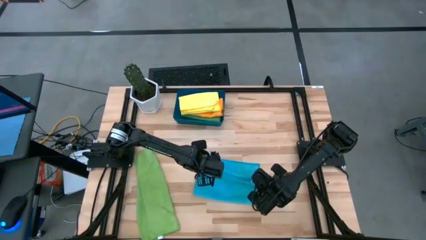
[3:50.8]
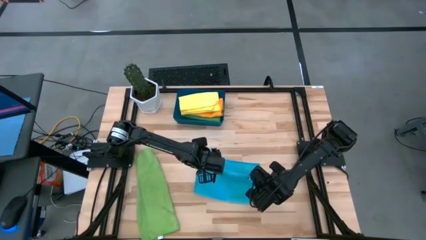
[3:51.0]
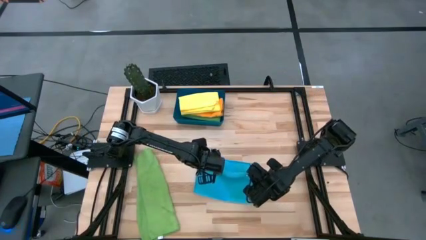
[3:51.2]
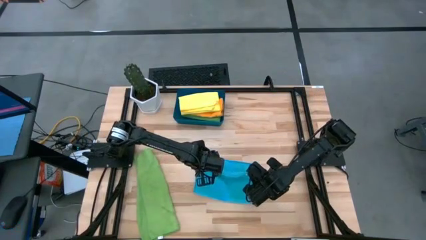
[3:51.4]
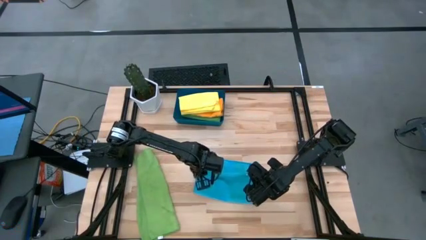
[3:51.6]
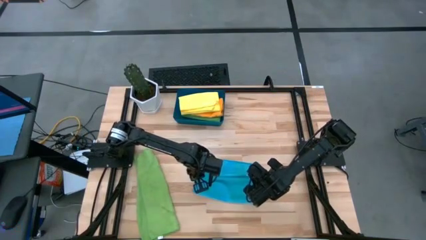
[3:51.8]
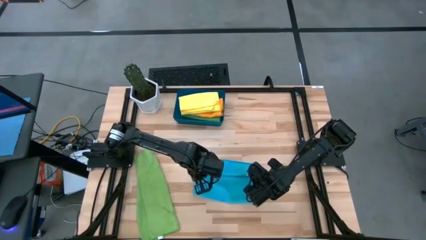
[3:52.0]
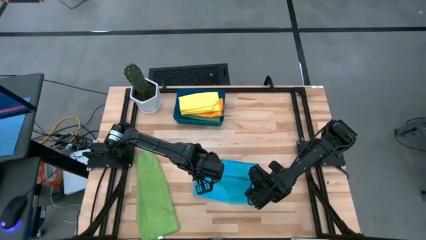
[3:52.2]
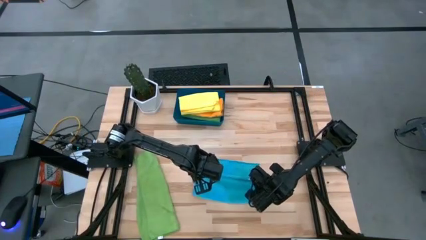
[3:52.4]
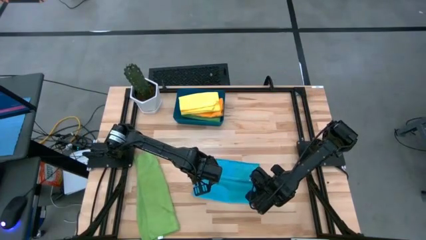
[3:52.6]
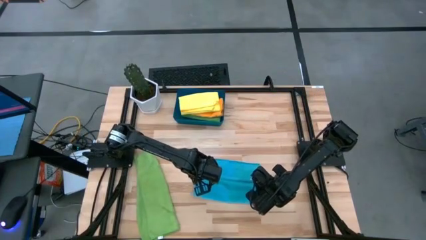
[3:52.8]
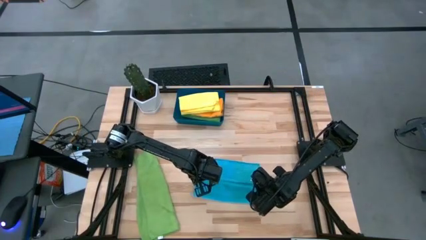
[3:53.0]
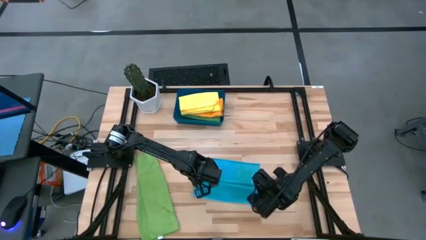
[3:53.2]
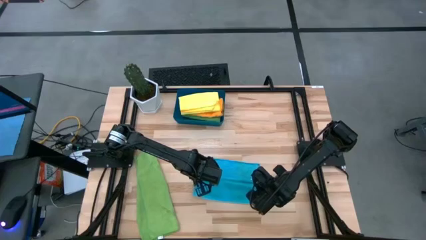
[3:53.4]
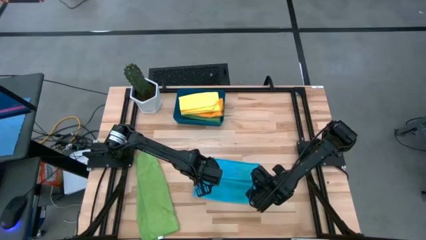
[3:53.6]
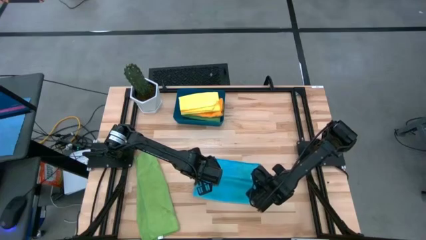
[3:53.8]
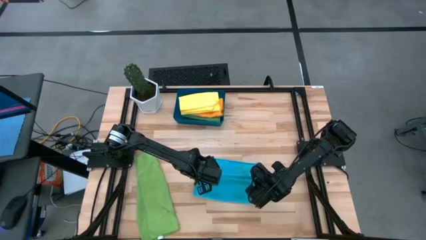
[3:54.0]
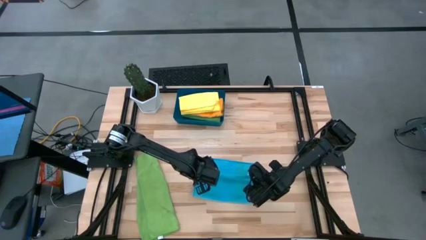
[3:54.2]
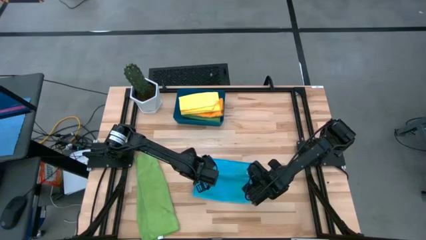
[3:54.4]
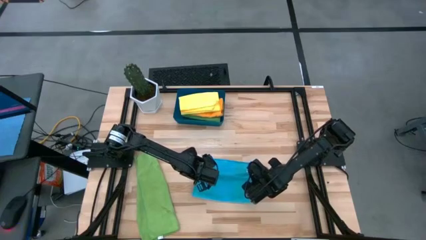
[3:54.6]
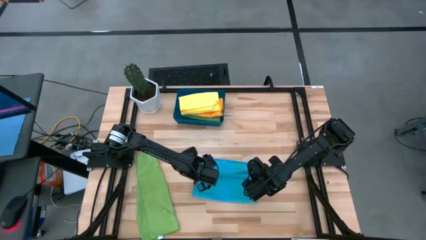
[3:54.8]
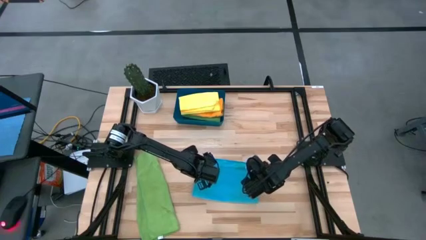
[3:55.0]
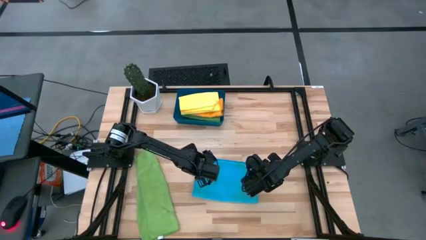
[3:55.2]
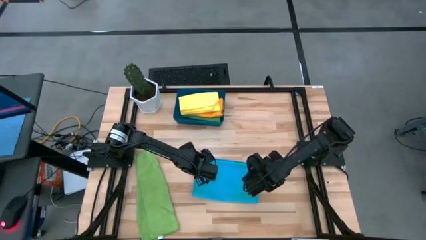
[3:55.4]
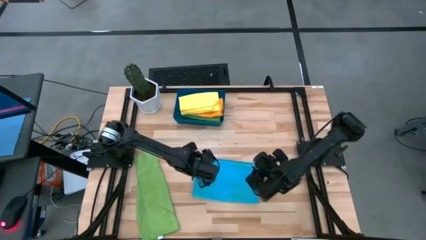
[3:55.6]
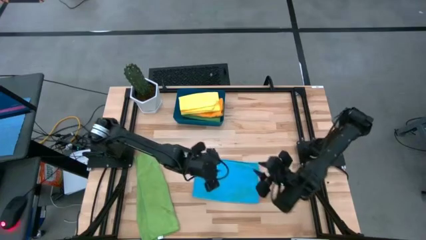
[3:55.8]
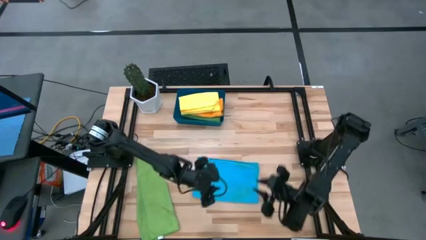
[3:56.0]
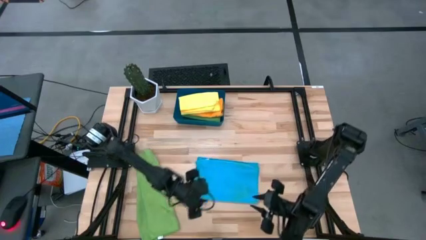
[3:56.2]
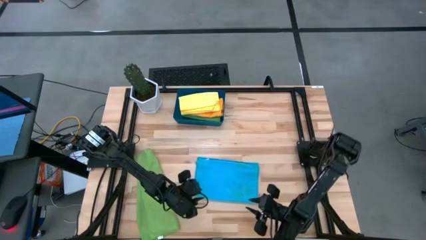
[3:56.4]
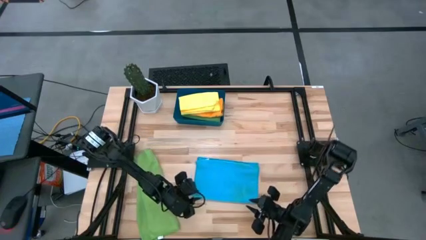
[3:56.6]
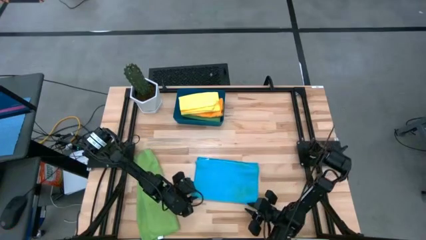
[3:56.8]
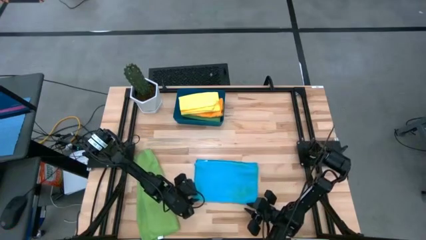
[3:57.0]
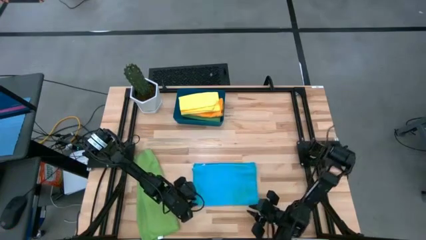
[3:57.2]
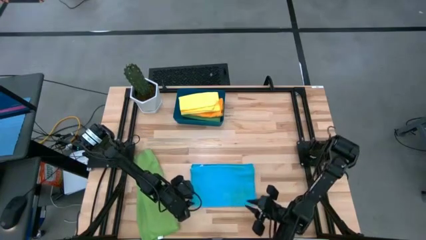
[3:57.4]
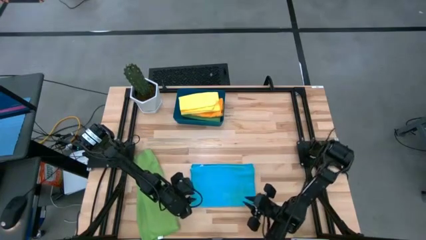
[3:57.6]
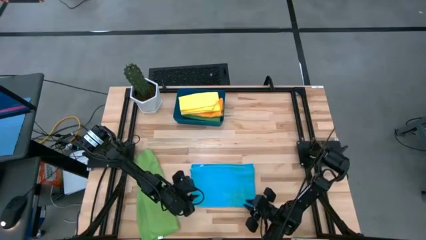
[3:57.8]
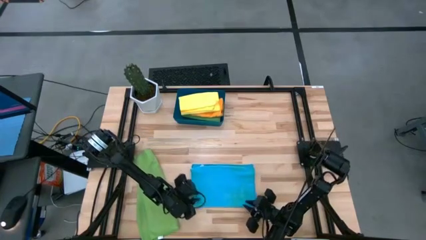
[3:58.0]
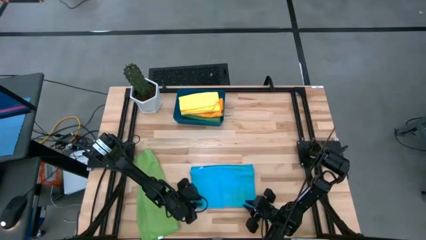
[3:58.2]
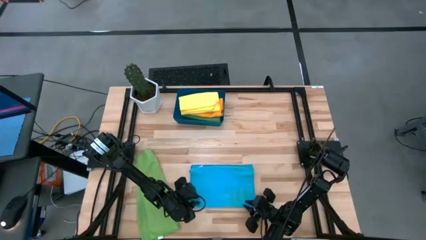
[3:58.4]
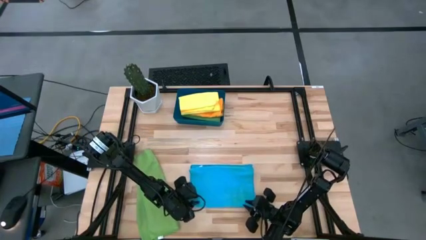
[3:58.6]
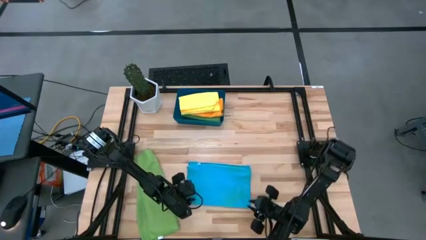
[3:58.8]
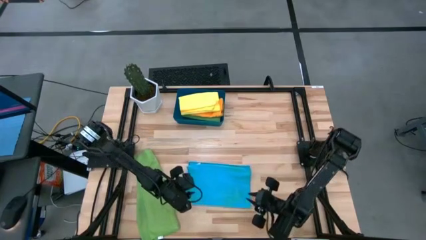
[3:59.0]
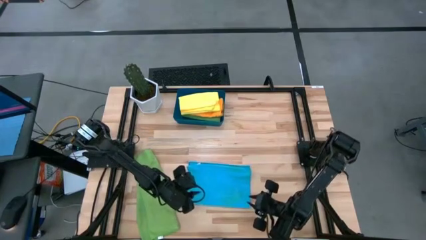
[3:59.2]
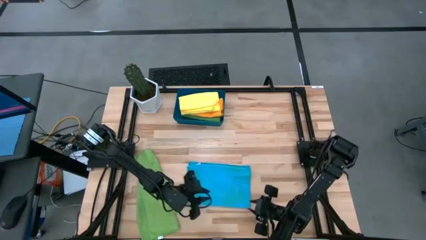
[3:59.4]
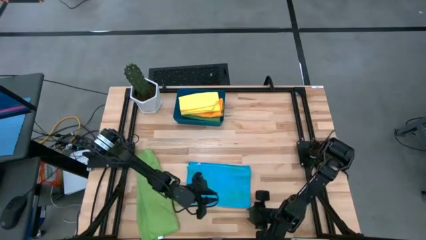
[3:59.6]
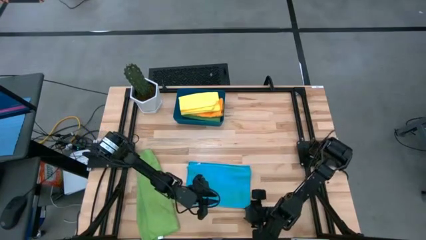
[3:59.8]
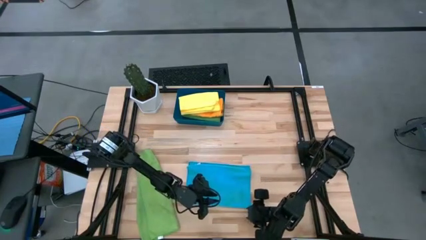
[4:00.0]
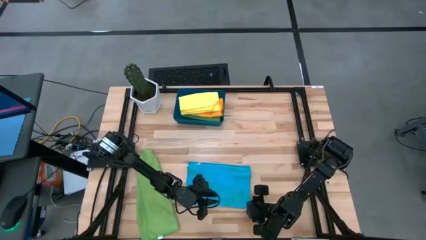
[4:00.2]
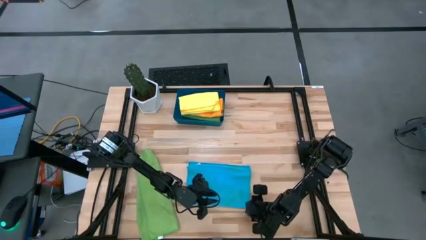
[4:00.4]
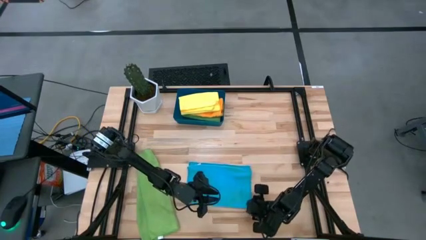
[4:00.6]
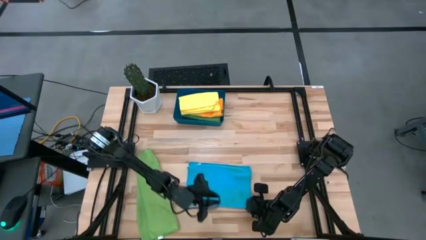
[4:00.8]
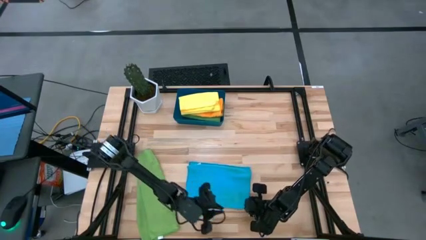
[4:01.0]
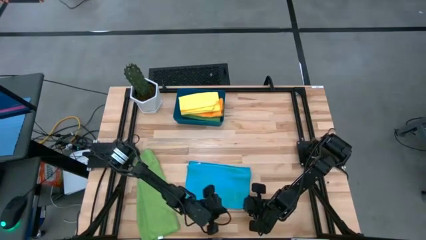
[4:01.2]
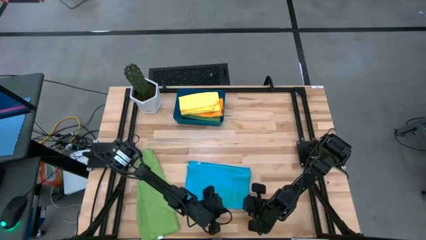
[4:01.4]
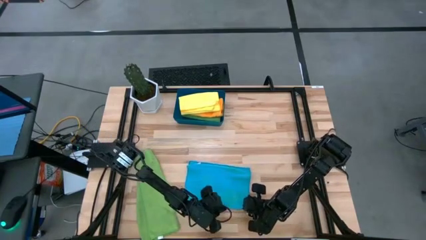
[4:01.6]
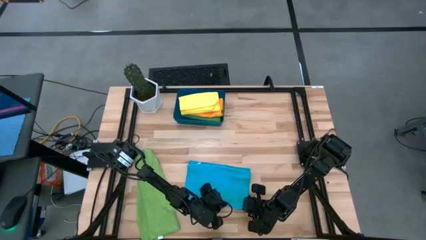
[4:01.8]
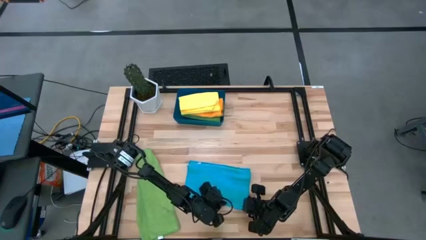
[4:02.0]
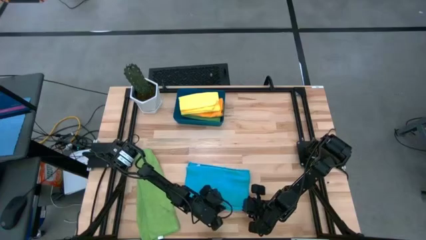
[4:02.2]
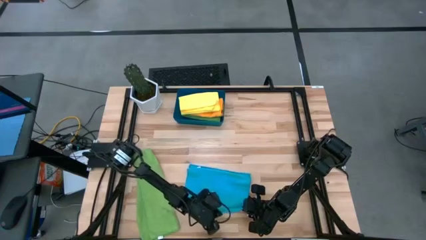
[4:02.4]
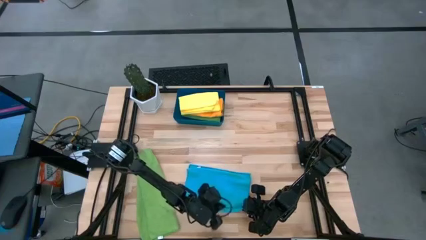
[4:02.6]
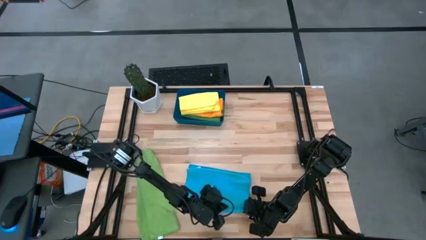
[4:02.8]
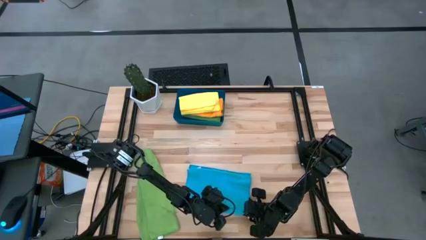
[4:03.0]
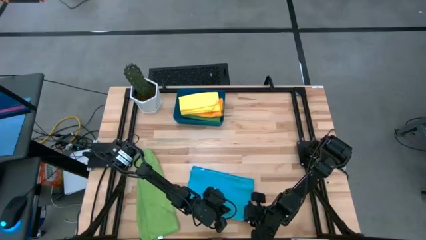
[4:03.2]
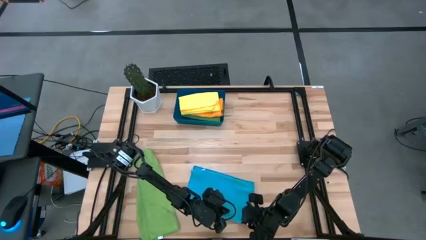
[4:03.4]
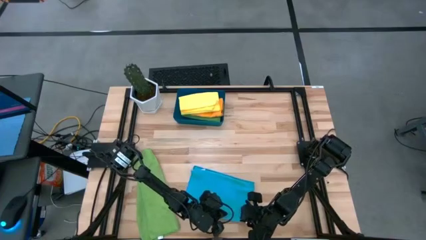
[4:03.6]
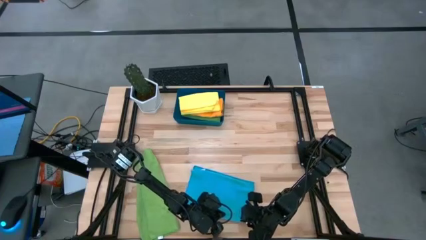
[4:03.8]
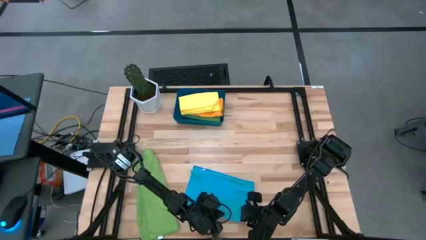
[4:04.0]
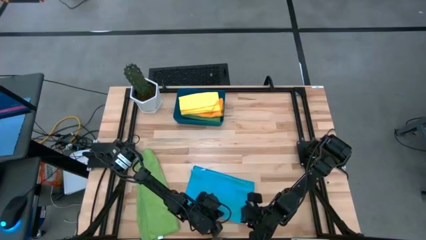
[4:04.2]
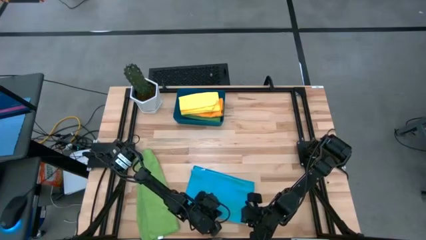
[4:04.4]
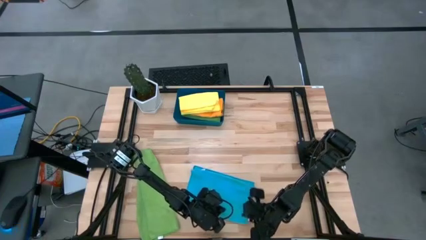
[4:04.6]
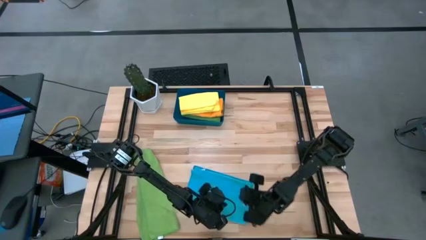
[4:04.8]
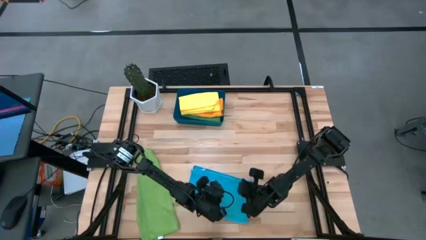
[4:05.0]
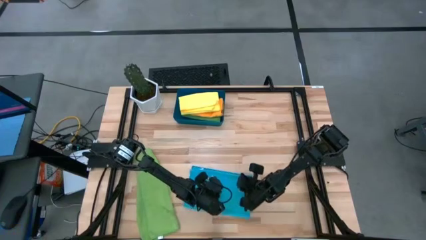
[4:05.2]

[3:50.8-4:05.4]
Task: Fold microfiber towels
Fold the blue towel
